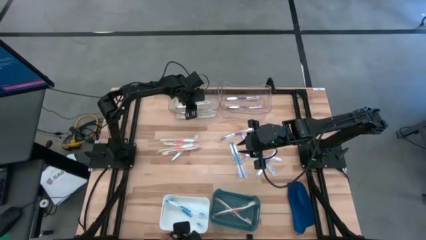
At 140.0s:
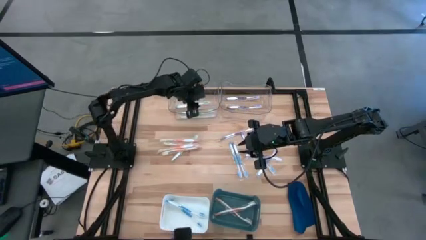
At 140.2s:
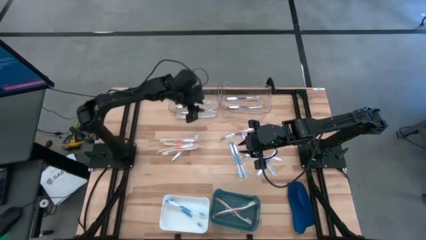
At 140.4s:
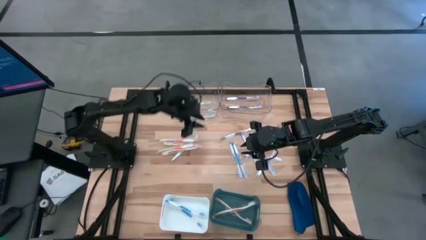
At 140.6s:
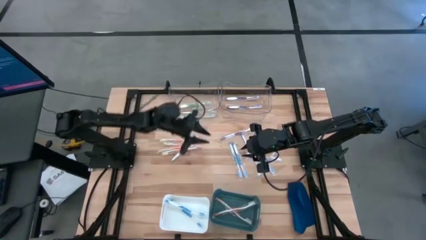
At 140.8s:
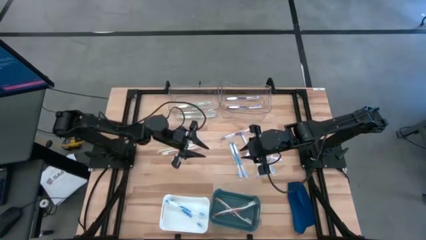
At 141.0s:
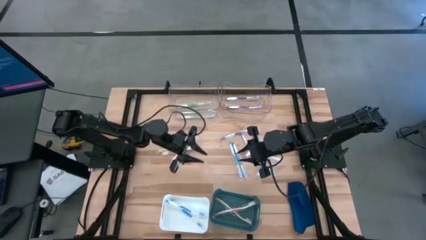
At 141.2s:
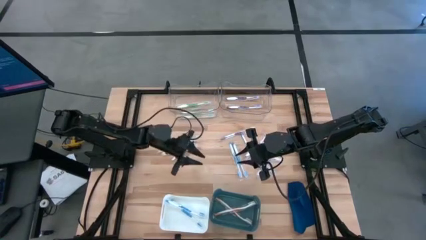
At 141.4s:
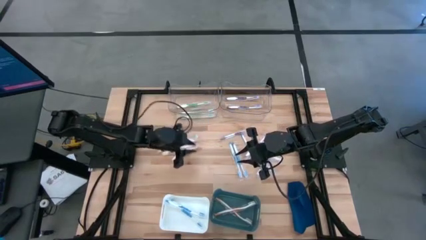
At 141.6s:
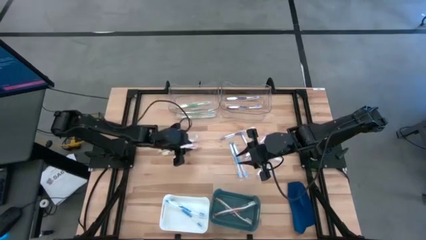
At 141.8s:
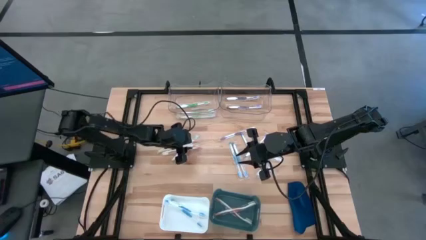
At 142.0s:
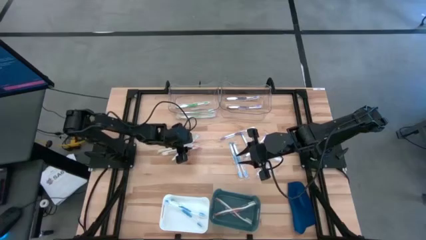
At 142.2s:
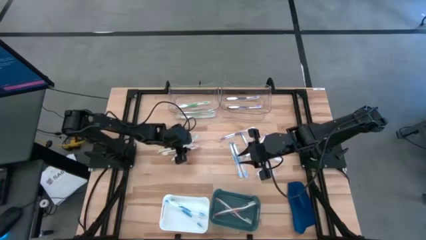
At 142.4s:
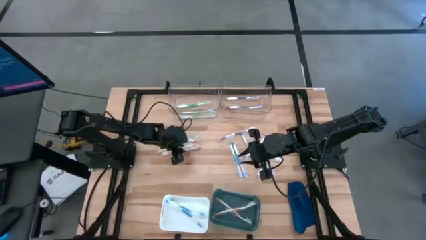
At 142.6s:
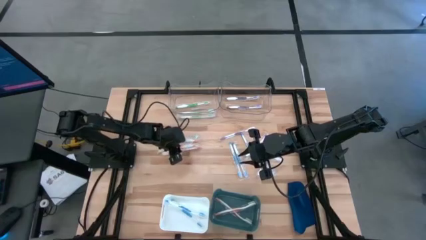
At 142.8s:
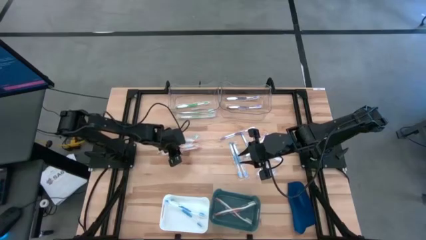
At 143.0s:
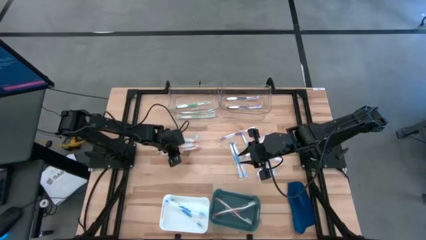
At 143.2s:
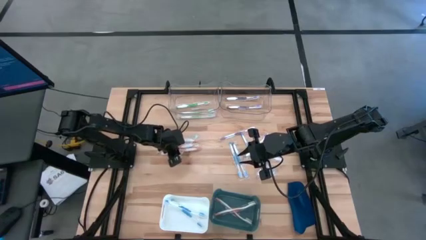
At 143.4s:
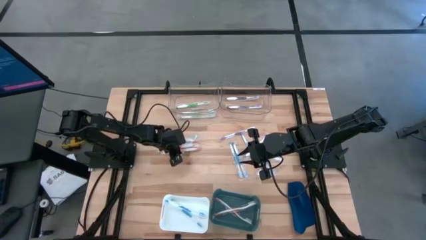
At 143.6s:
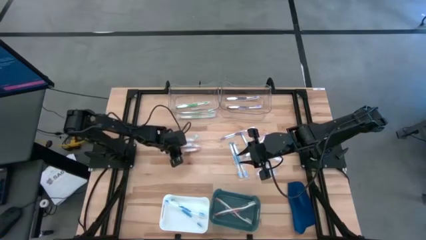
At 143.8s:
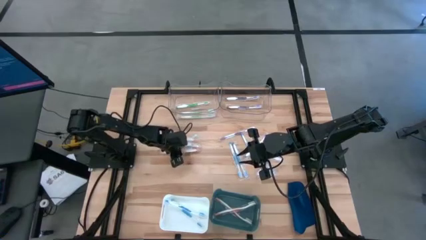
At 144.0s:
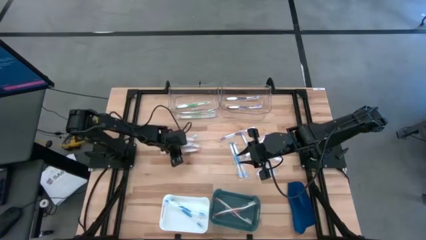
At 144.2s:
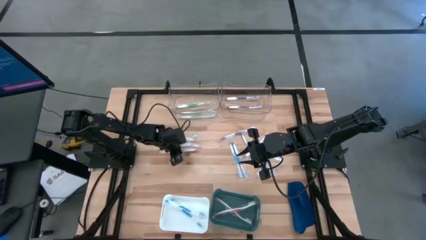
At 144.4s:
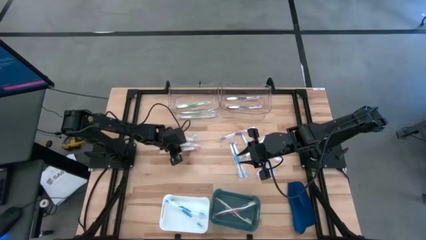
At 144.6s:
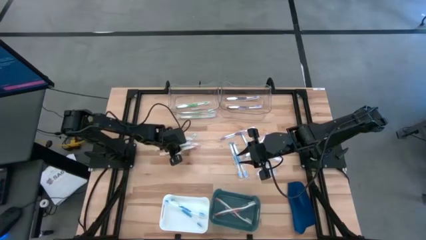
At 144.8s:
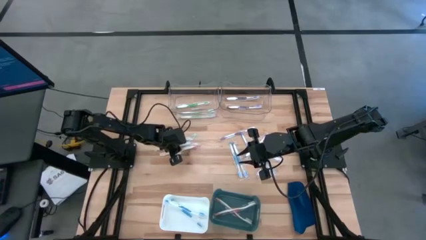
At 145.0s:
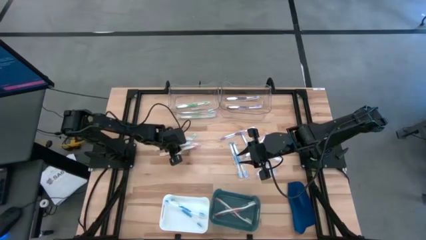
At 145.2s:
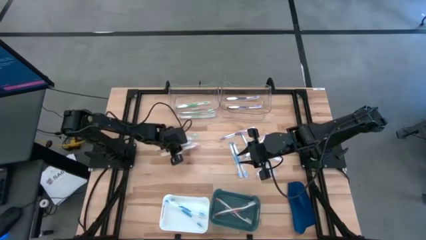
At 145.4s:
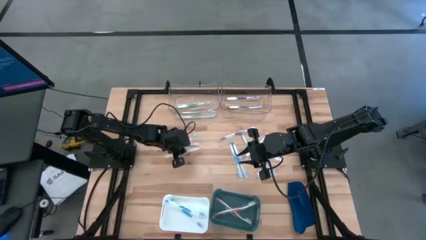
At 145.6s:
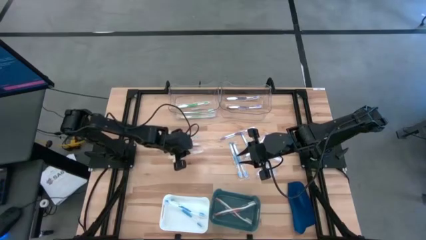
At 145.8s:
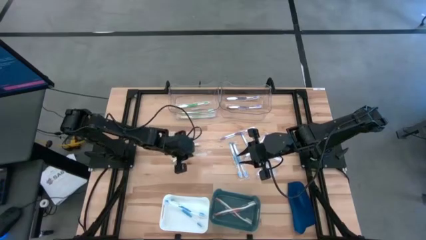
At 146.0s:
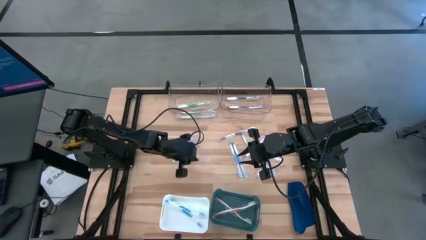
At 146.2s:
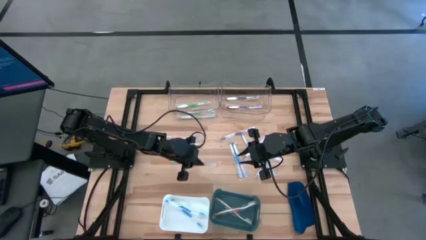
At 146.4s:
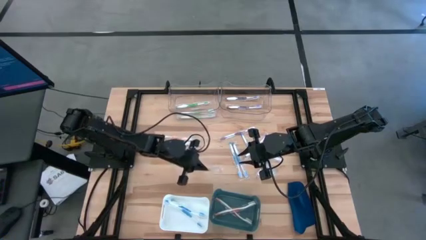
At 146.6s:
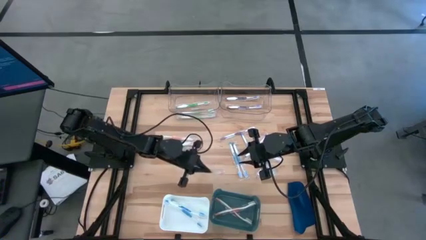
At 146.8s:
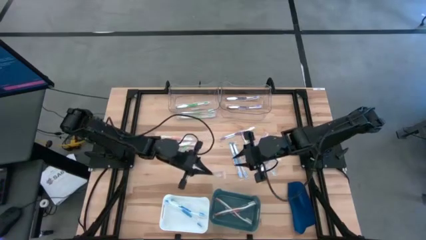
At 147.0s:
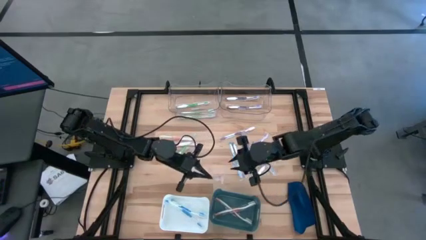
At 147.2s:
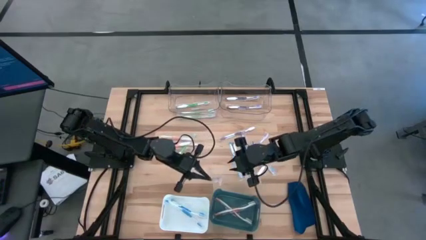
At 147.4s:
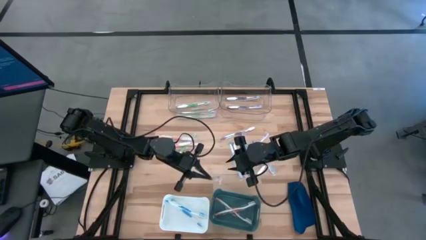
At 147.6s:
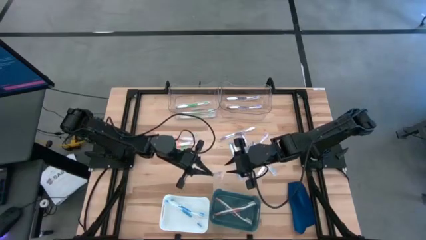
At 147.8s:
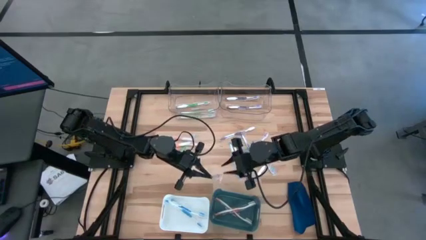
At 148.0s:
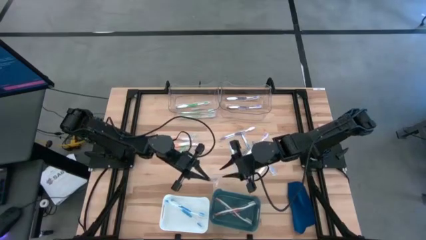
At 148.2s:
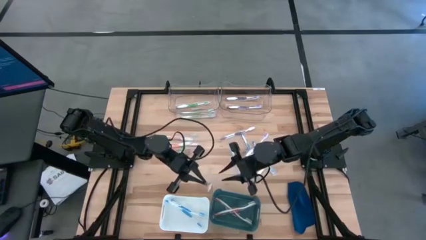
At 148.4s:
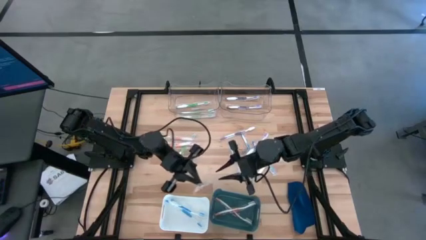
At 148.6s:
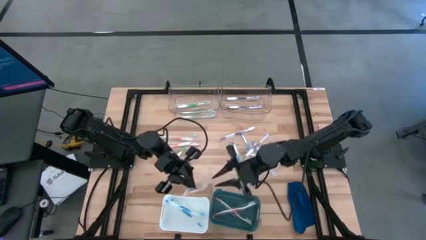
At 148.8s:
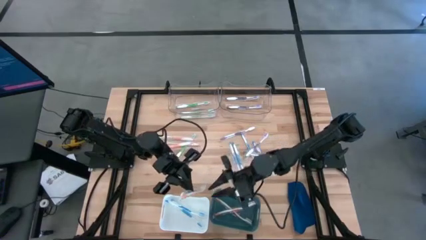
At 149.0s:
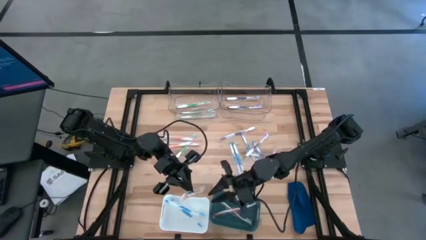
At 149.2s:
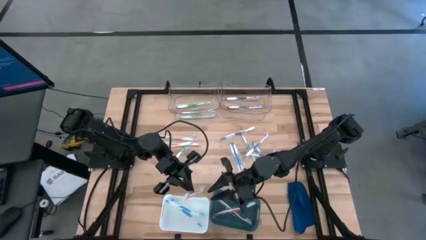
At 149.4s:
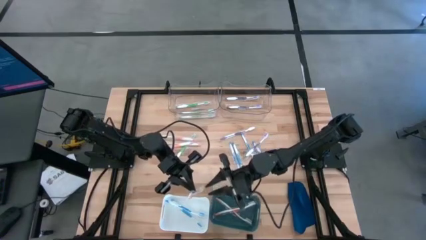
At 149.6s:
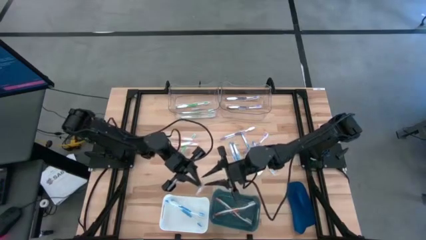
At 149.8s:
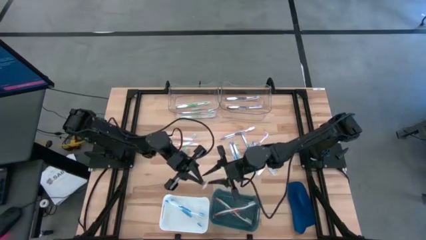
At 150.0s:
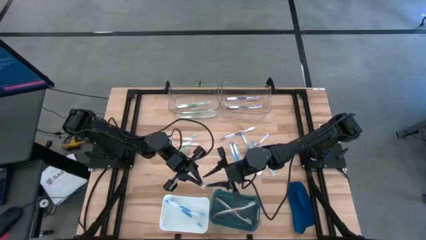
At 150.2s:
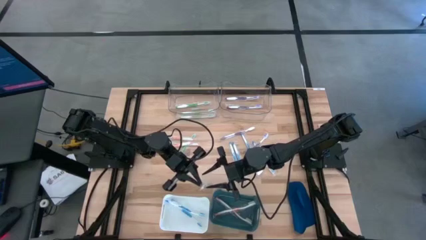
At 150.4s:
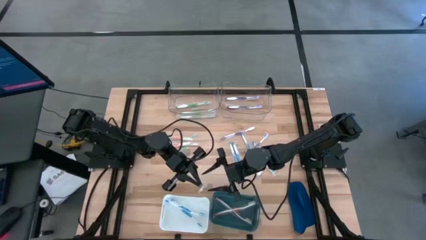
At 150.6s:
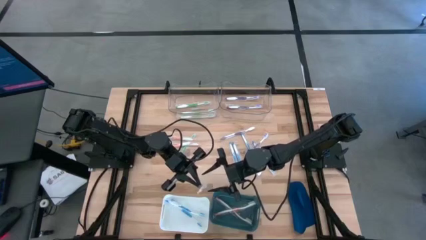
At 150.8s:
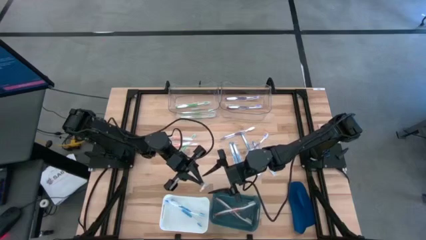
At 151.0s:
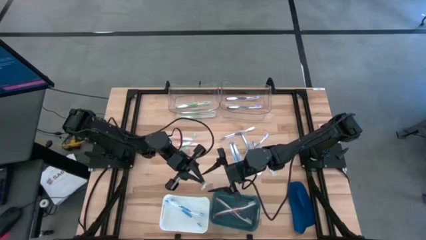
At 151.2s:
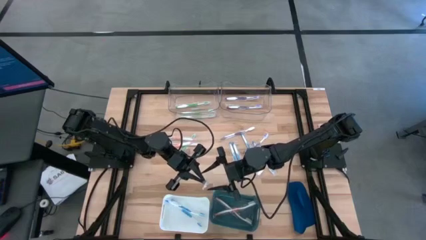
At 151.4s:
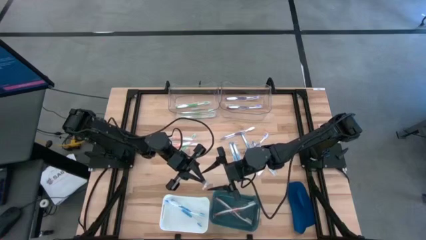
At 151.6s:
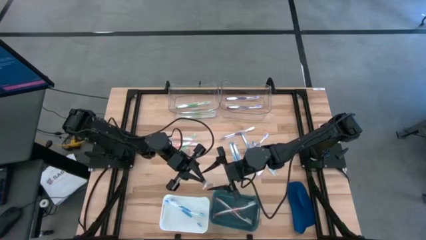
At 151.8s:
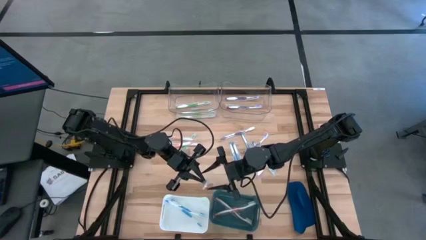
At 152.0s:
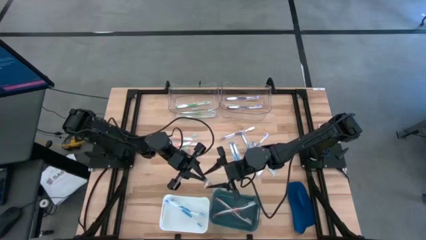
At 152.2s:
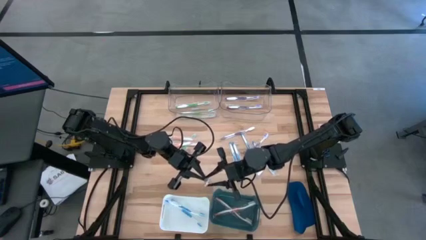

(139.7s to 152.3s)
Task: Pick & Place Toothbrushes
Put the orange toothbrush into the green bin

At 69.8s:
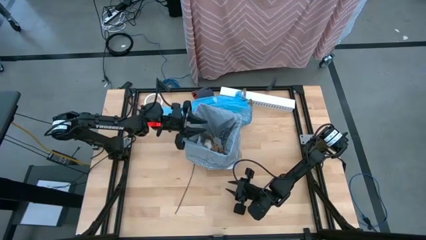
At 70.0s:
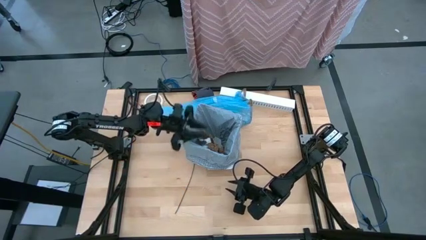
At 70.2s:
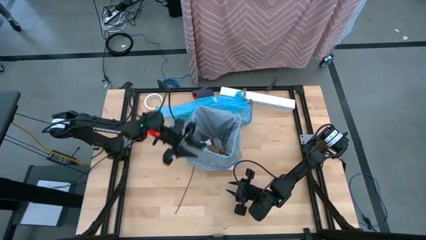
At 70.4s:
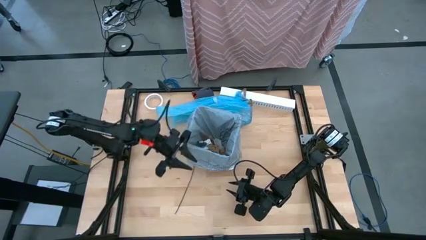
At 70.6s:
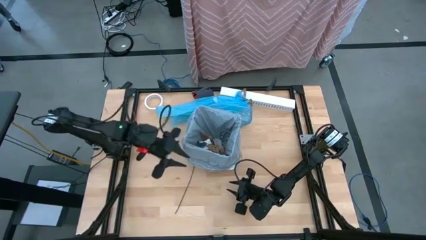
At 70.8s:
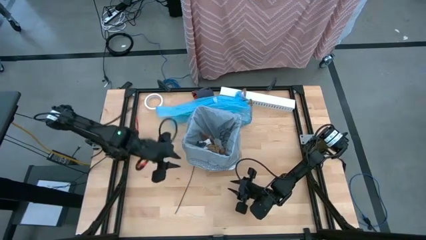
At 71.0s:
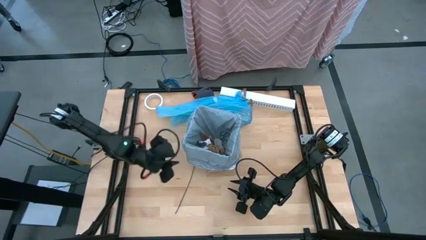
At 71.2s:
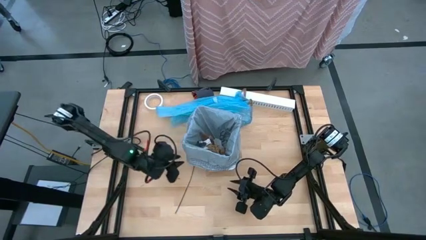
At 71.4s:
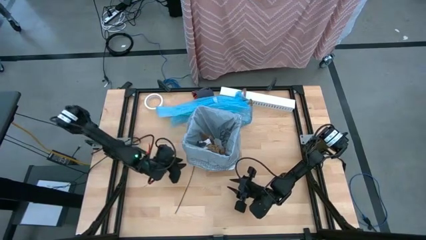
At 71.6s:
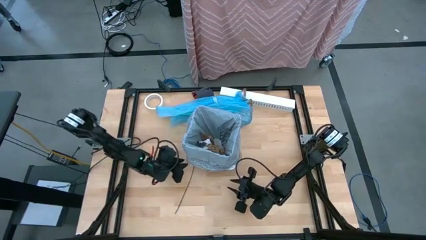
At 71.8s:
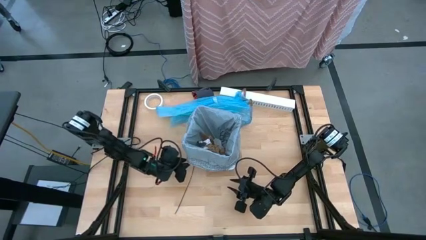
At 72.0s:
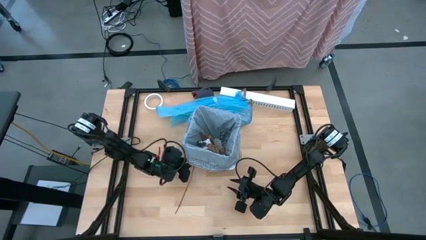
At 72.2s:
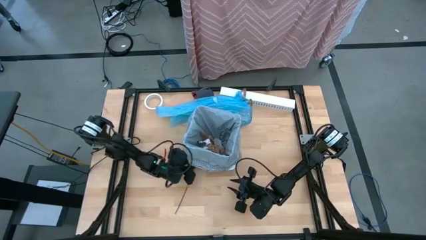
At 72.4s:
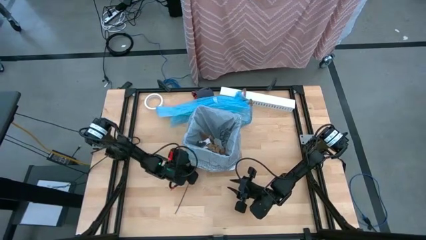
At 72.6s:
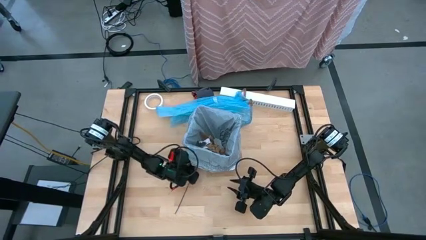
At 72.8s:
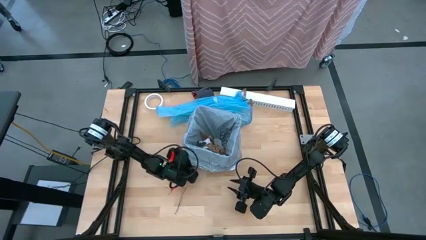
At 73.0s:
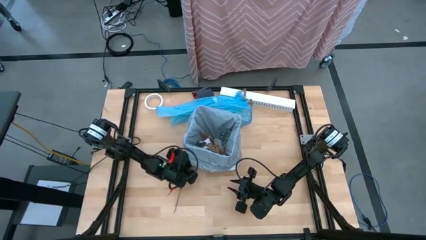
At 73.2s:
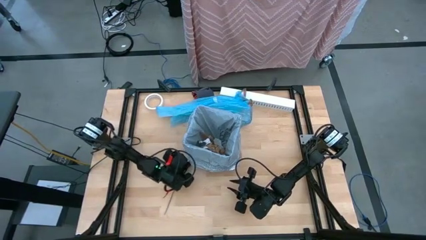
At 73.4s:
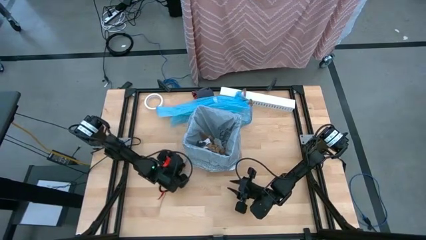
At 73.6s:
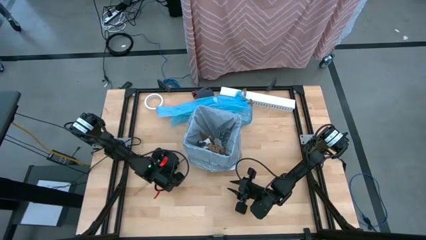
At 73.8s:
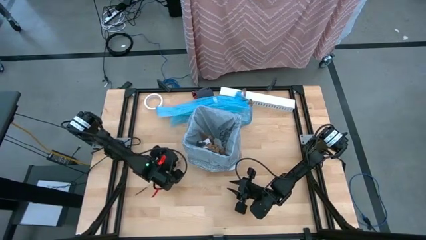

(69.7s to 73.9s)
Task: place trash/remove bag and relplace
Put the black zip tie inside the black trash bin
